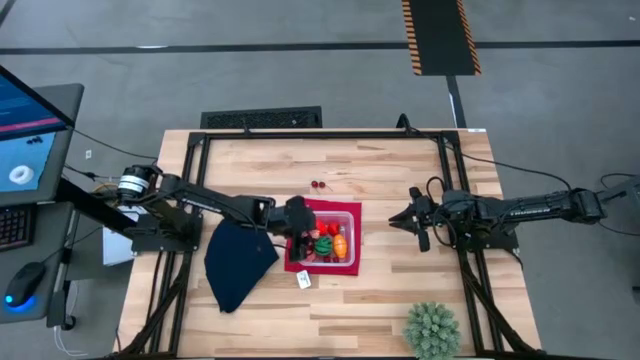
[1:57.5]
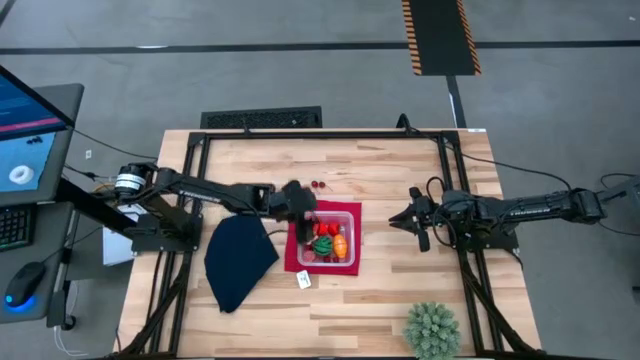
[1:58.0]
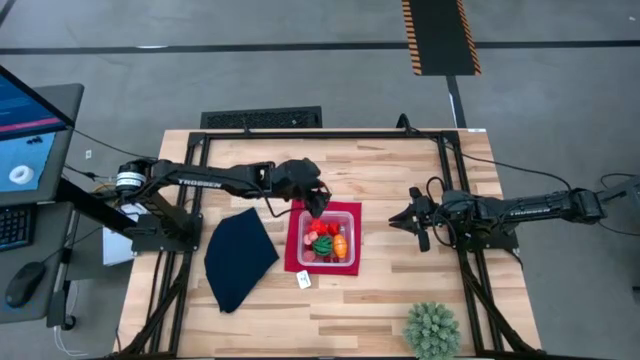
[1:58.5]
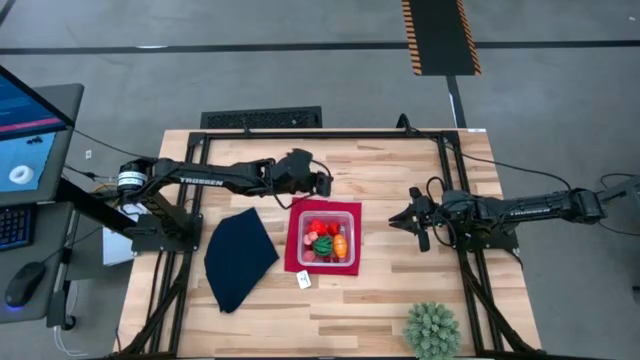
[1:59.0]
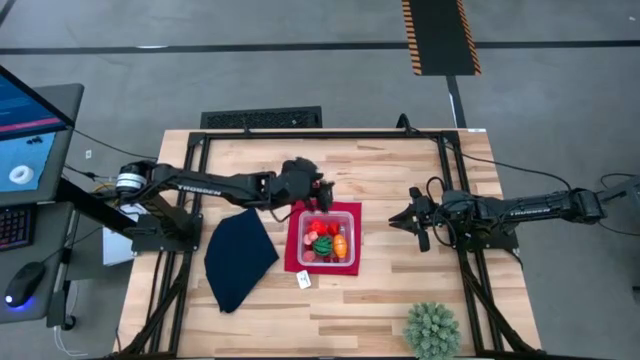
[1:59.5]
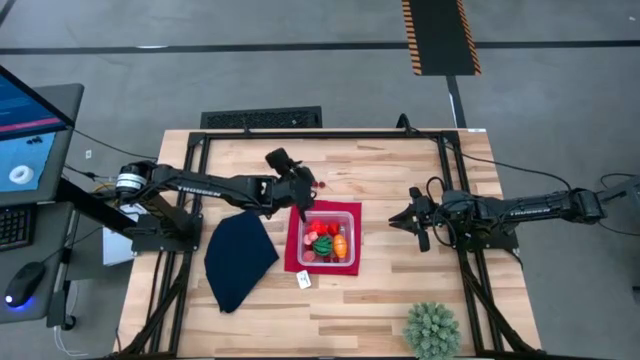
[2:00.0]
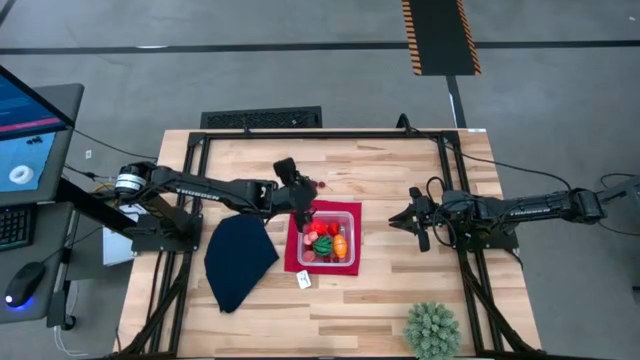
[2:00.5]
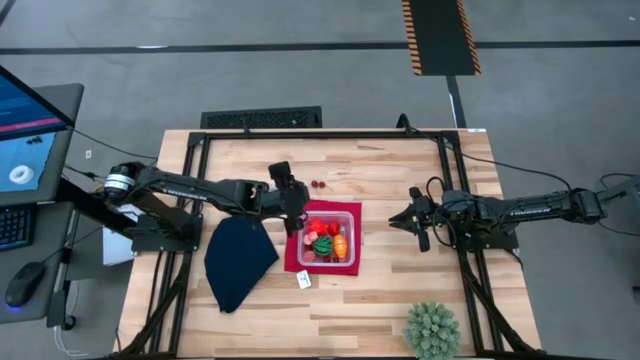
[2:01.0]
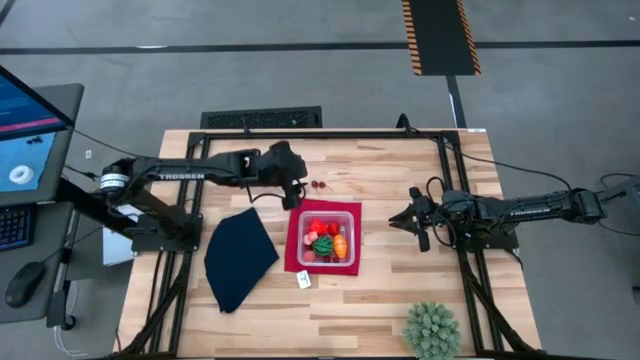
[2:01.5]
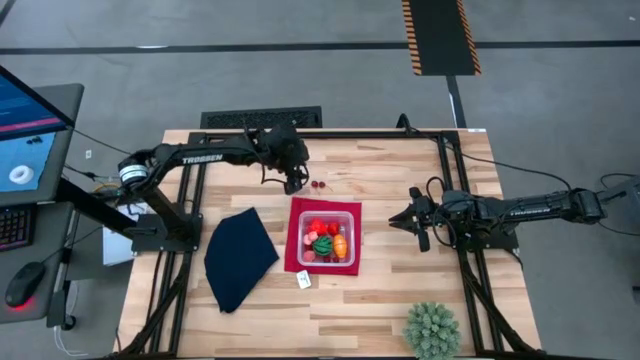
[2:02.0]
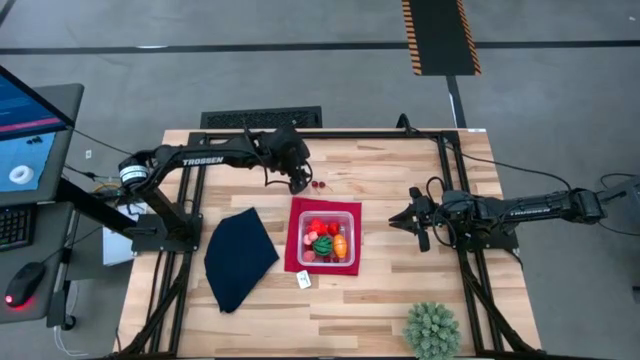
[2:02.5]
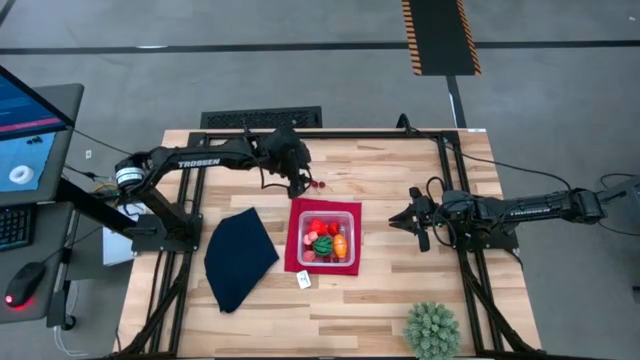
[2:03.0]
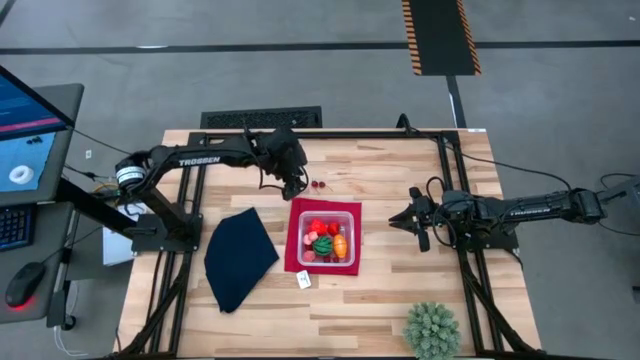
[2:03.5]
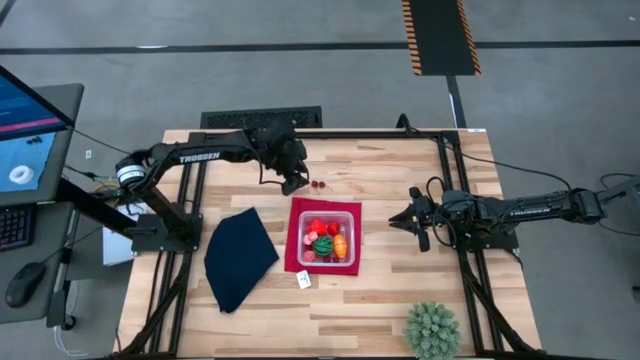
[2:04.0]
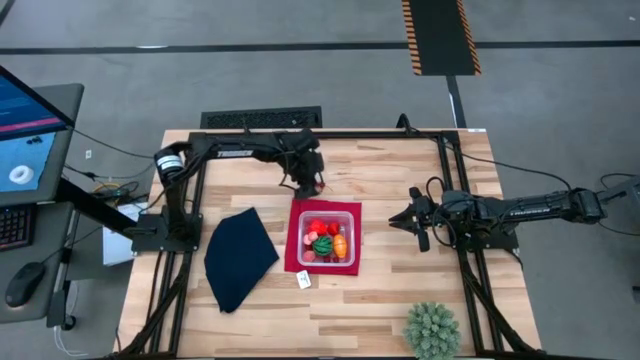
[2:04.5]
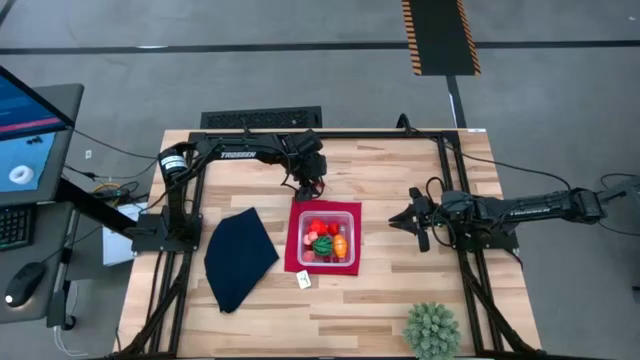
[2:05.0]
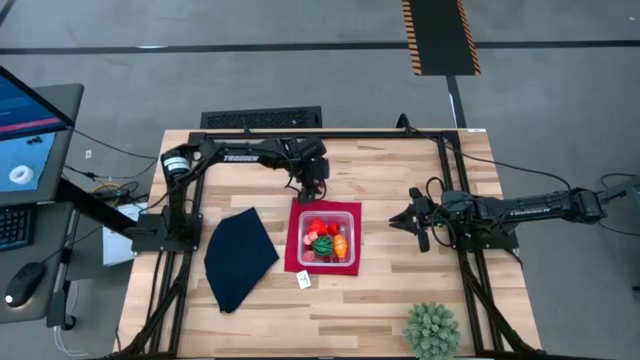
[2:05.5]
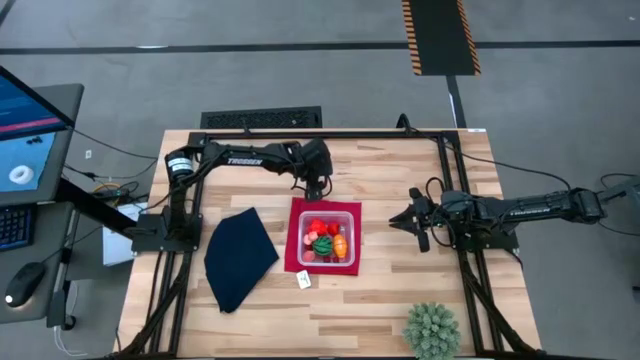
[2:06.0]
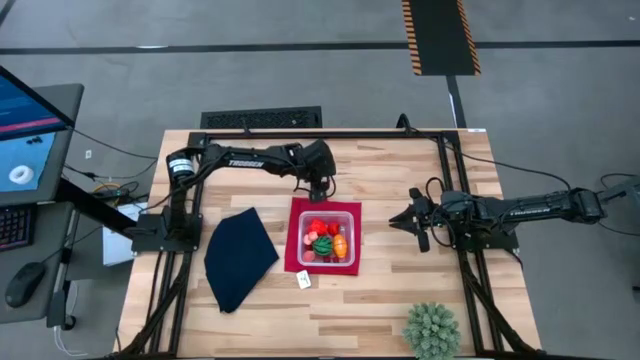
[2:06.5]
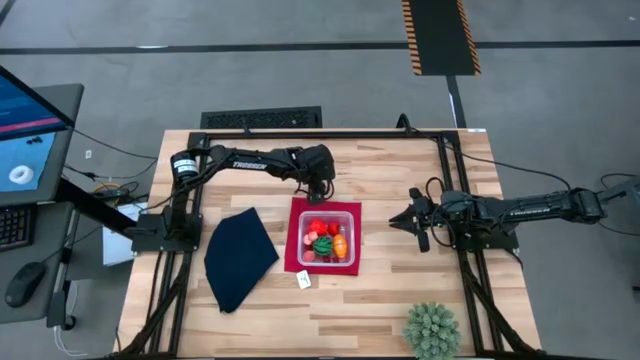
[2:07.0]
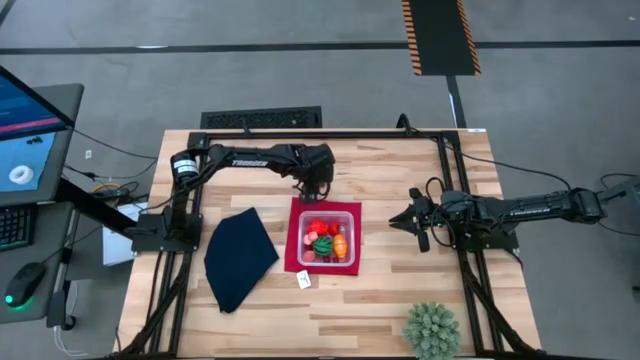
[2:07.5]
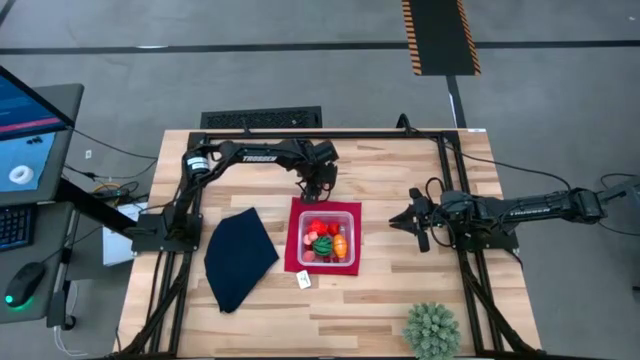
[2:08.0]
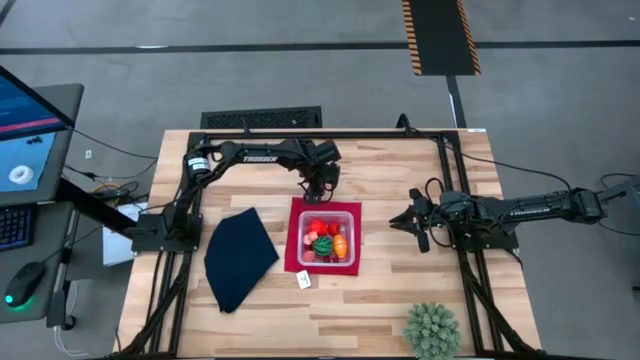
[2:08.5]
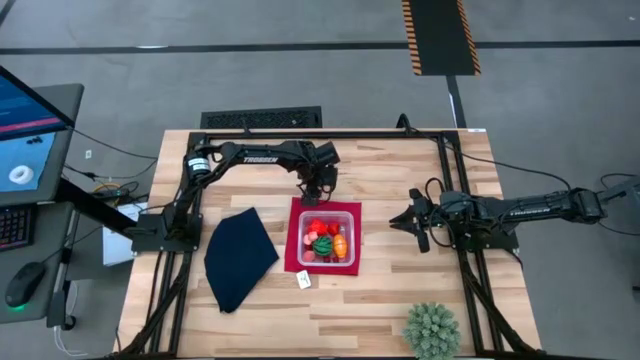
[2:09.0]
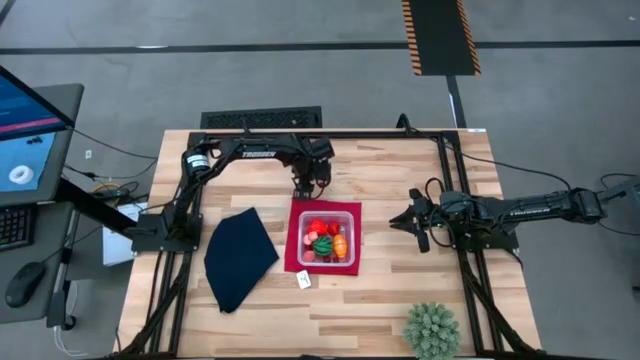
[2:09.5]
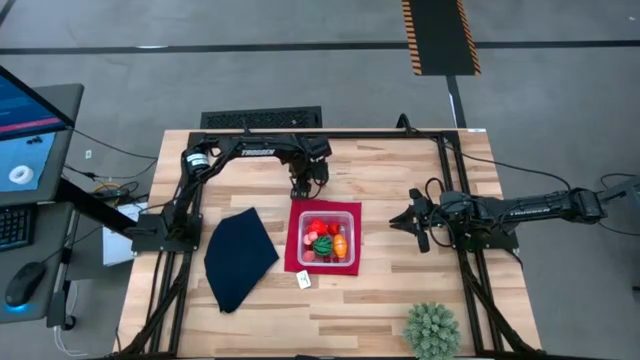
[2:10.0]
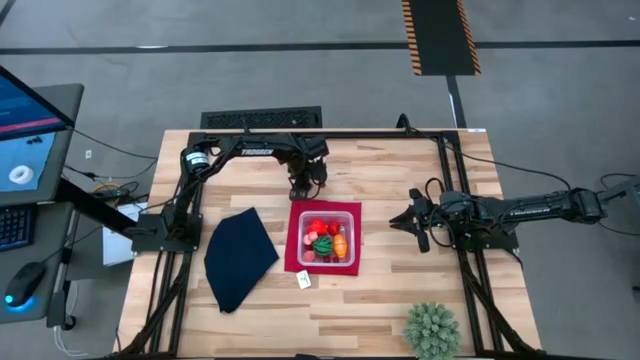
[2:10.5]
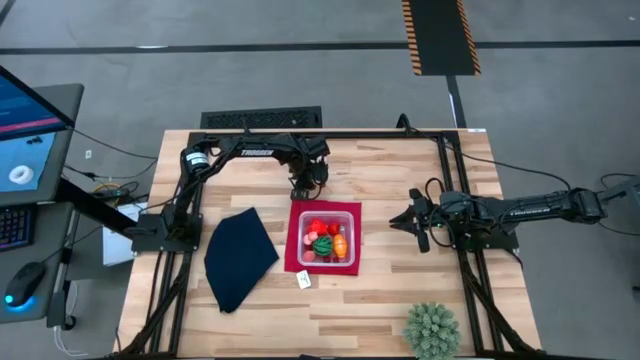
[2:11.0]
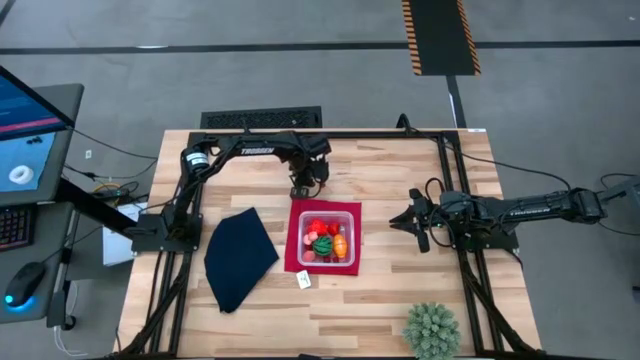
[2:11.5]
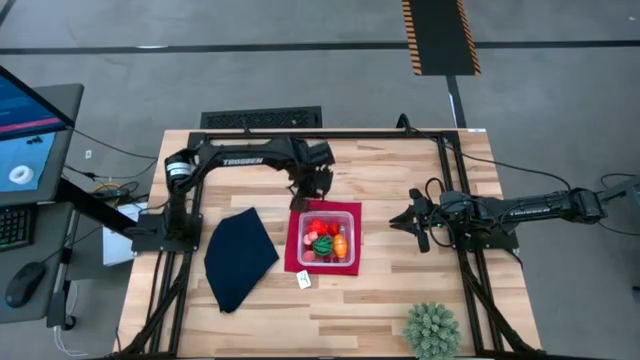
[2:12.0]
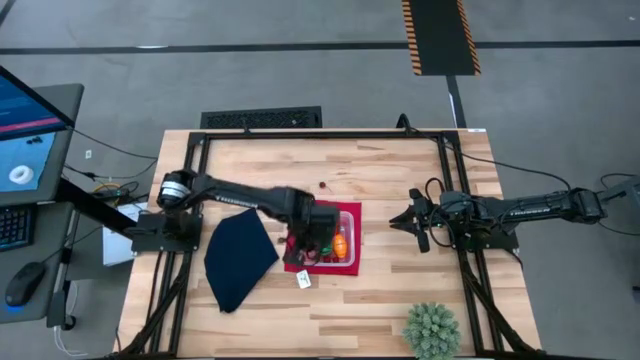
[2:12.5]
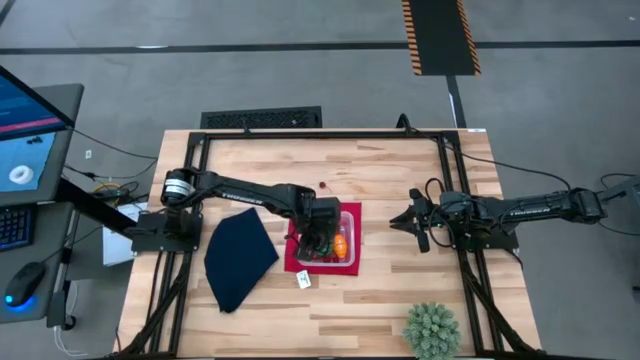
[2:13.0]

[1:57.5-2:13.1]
Task: Pick and placing Produce into tupperware
Put the cherry in the transparent bin

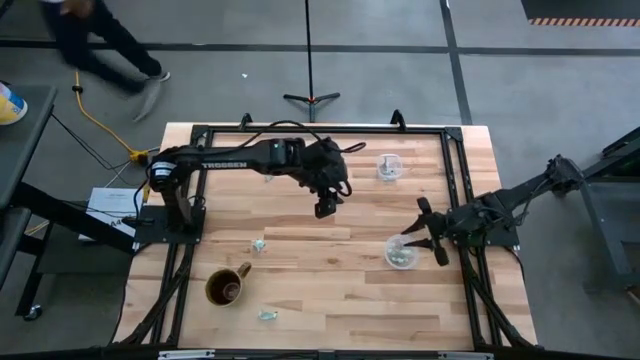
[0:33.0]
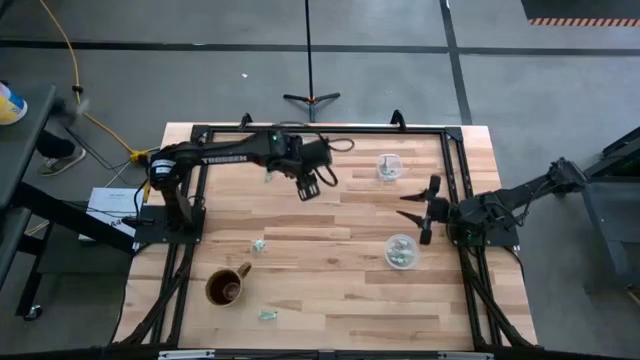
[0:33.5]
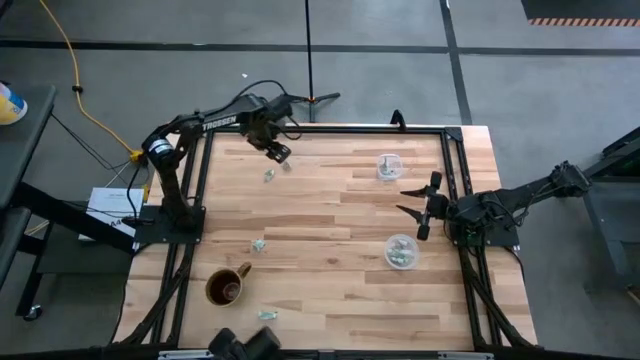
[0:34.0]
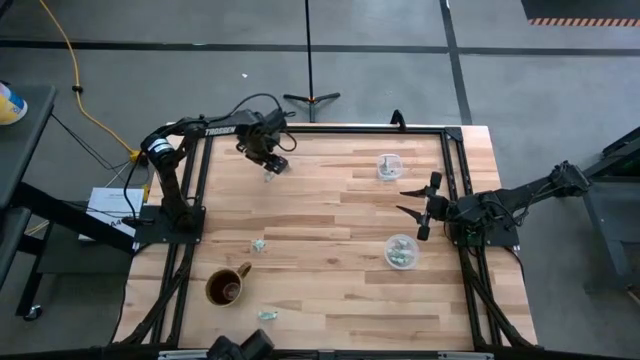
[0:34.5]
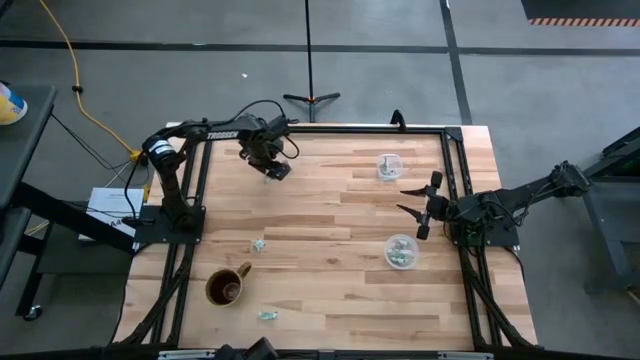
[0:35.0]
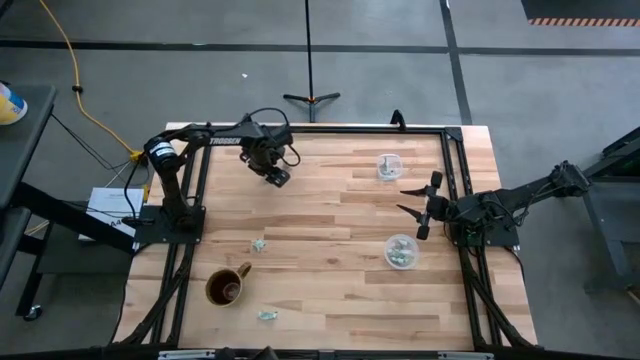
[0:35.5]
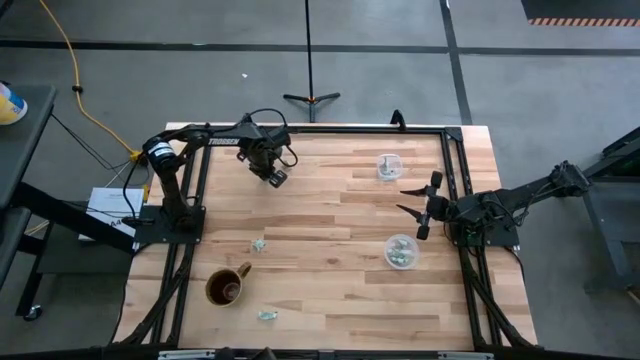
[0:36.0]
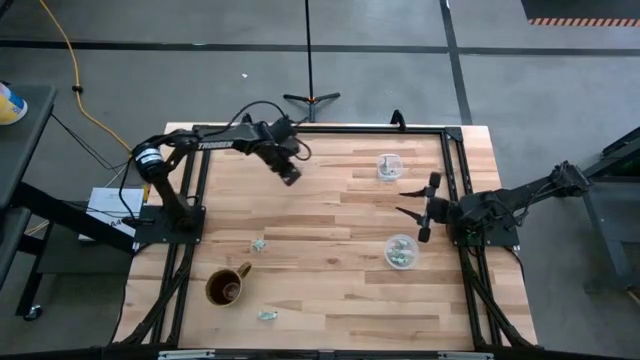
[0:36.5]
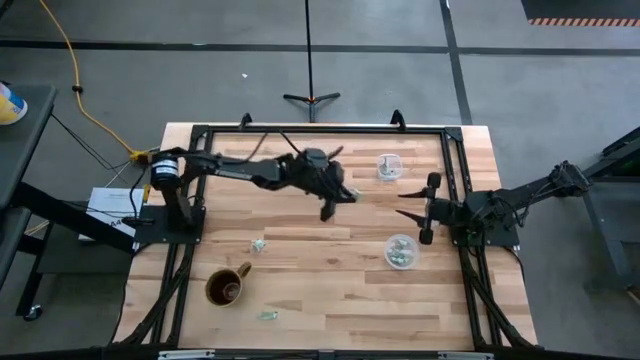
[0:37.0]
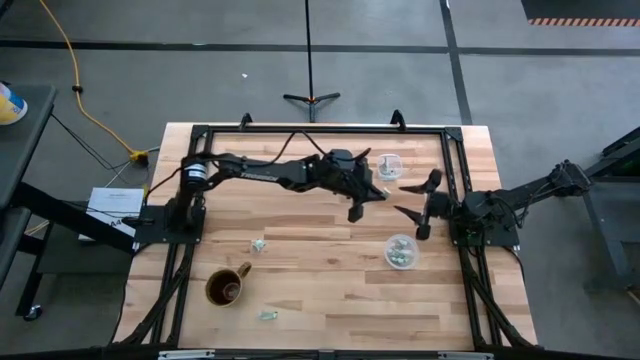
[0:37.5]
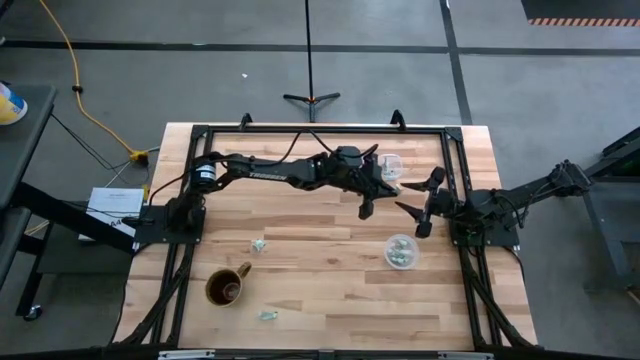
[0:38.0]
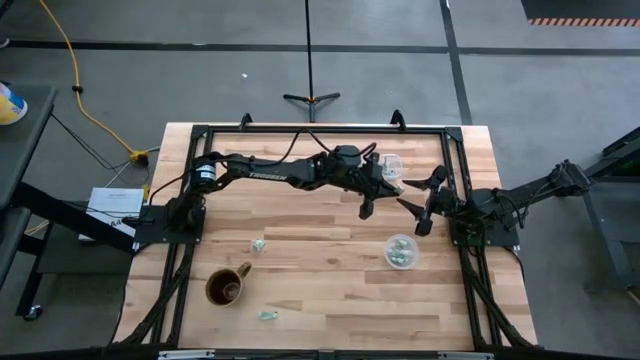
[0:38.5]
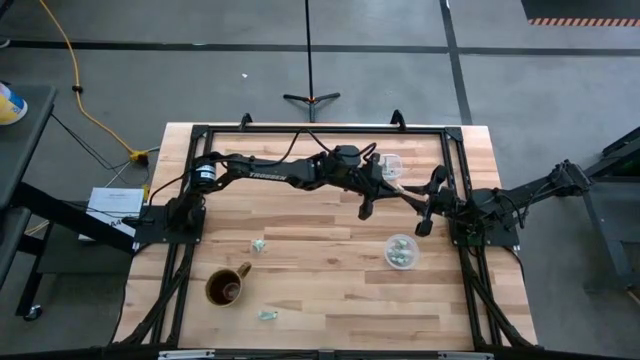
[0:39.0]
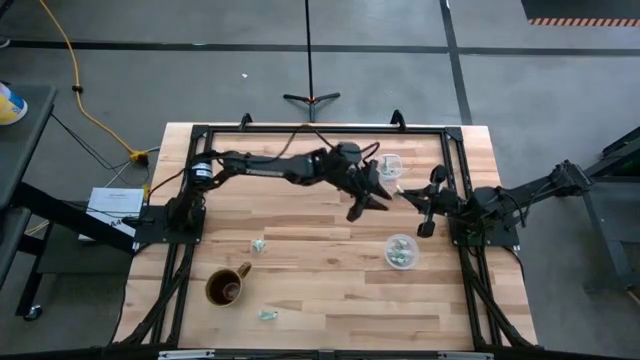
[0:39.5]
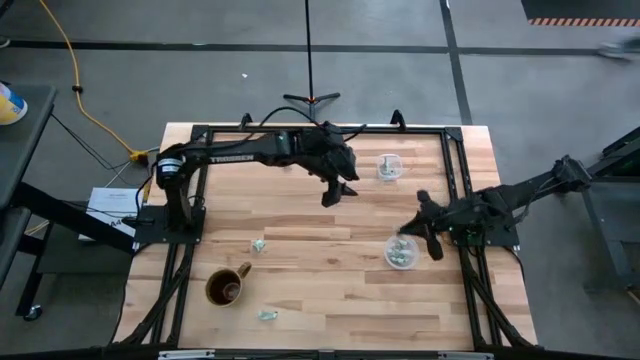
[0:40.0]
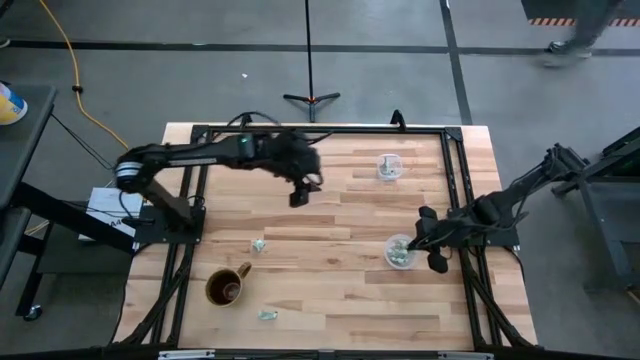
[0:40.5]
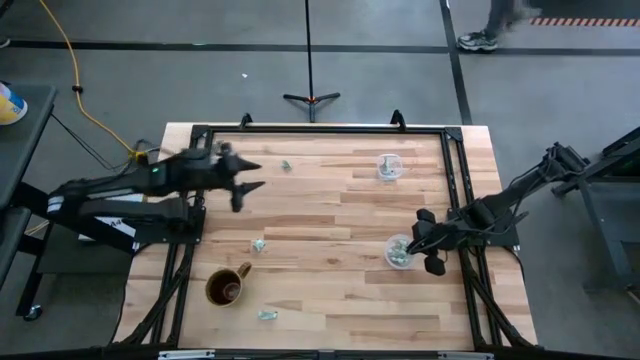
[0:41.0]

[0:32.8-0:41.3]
Task: Pick and place items into bin
Put the green stevia packet into the bottom transparent bin
